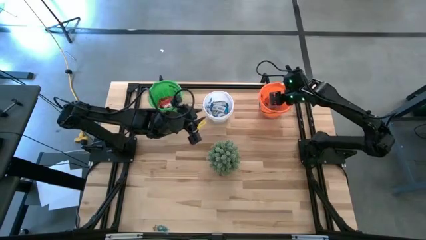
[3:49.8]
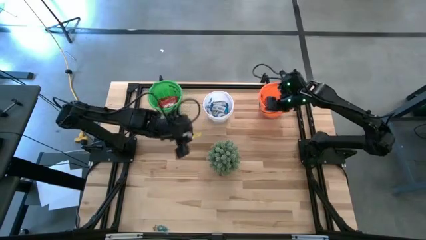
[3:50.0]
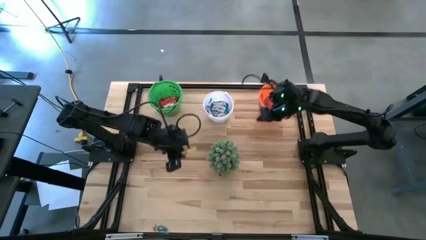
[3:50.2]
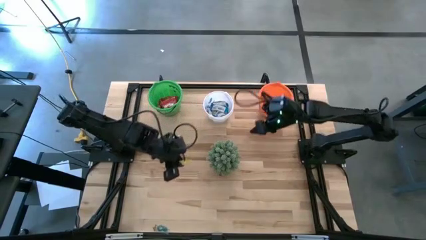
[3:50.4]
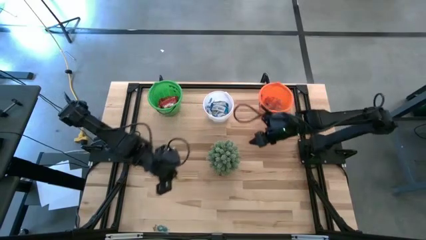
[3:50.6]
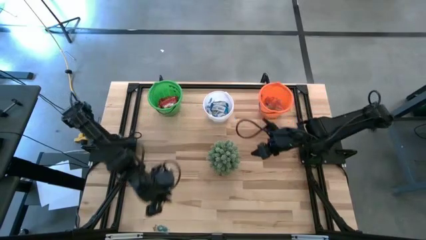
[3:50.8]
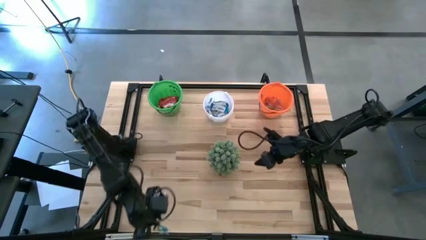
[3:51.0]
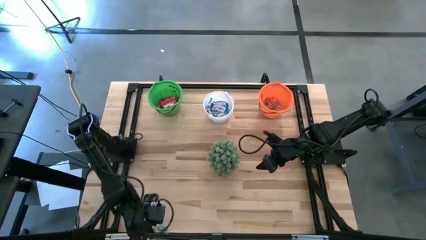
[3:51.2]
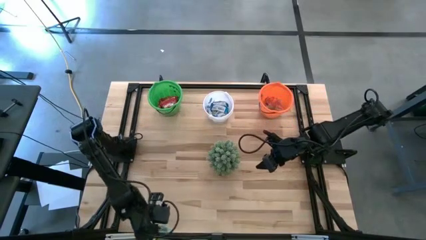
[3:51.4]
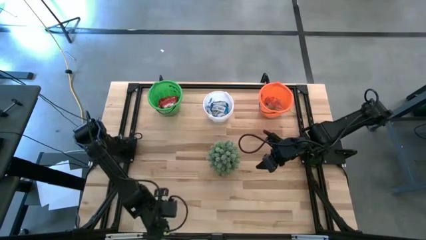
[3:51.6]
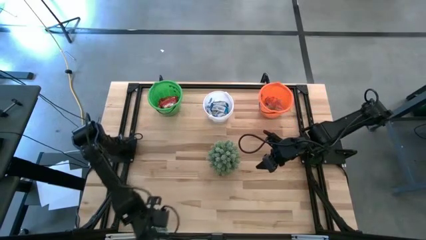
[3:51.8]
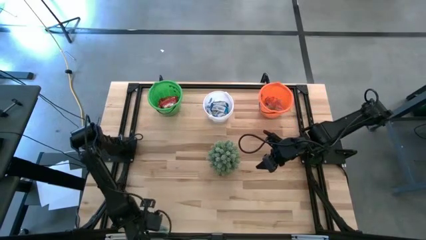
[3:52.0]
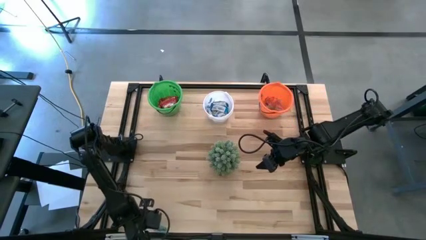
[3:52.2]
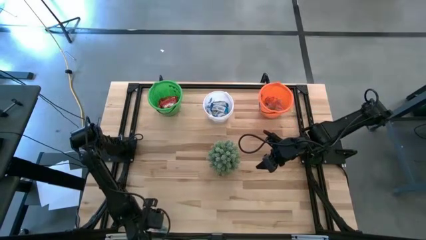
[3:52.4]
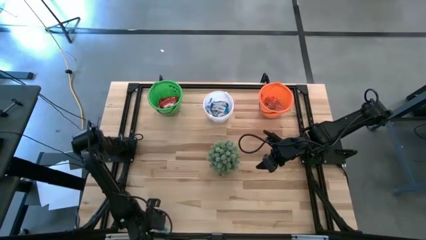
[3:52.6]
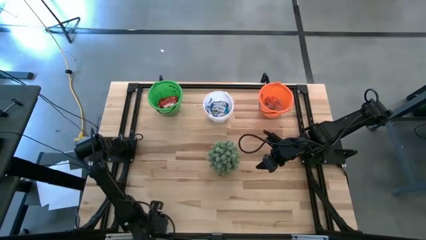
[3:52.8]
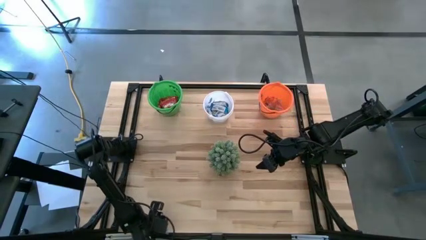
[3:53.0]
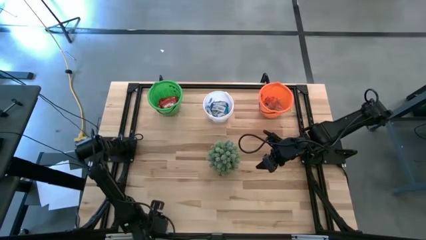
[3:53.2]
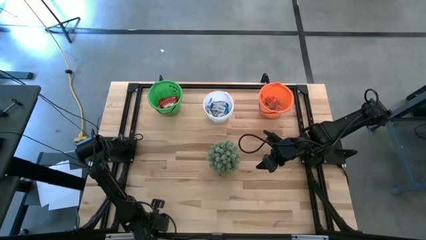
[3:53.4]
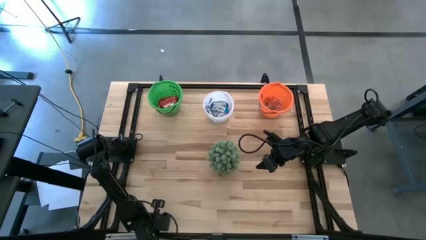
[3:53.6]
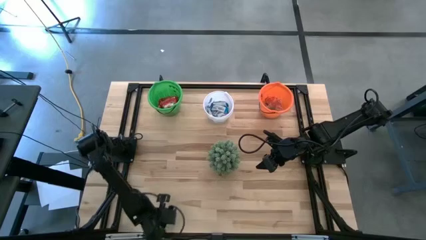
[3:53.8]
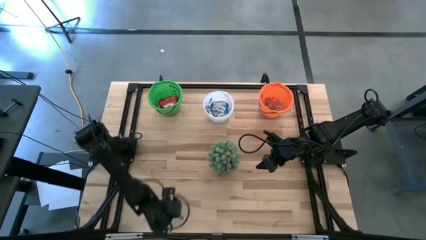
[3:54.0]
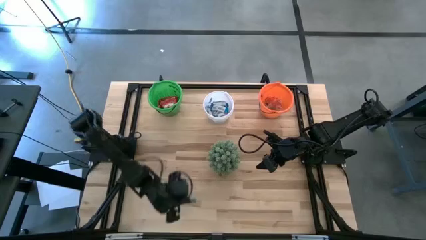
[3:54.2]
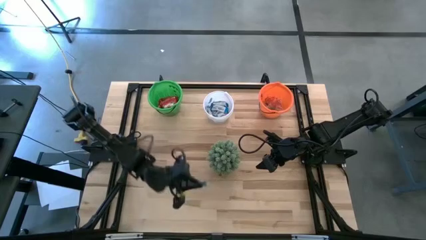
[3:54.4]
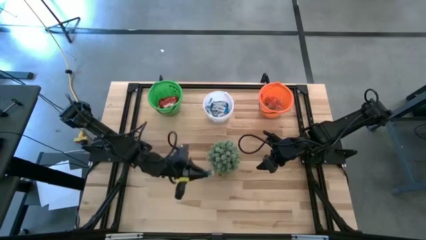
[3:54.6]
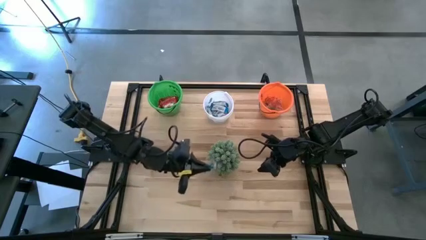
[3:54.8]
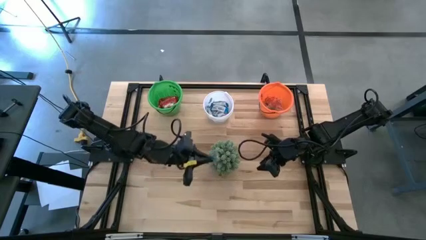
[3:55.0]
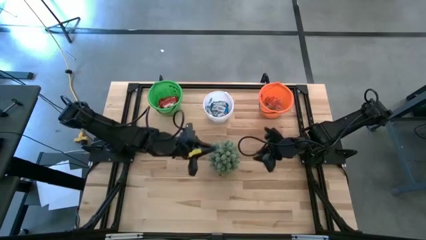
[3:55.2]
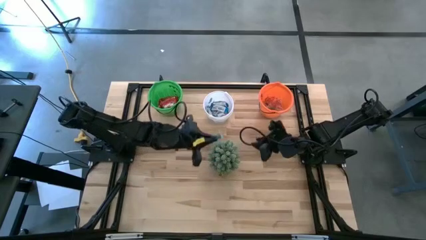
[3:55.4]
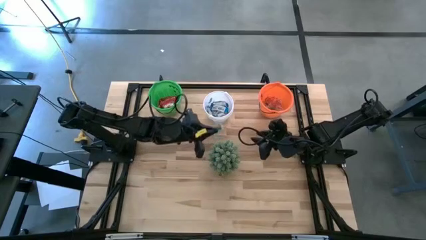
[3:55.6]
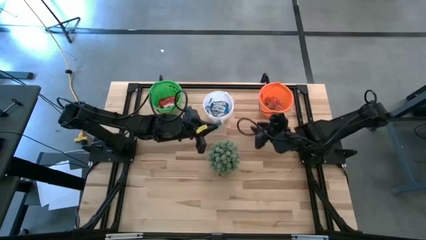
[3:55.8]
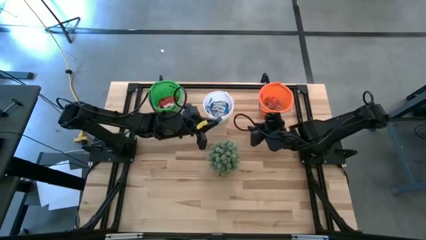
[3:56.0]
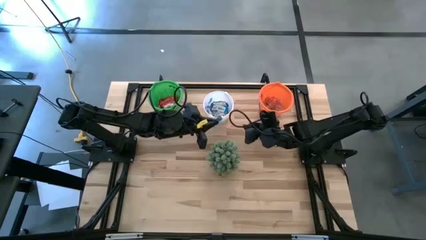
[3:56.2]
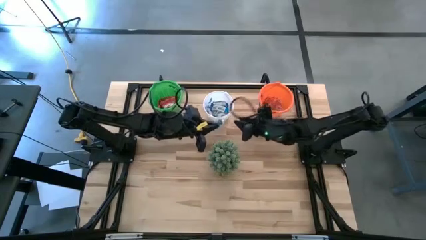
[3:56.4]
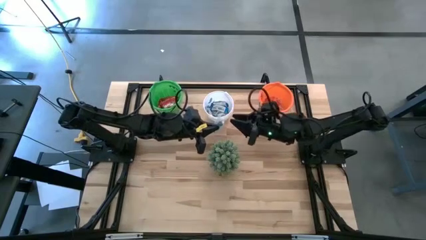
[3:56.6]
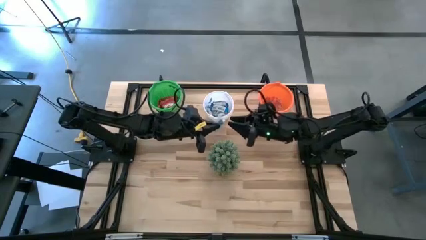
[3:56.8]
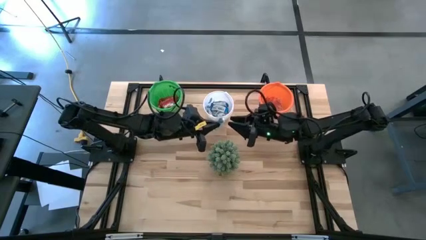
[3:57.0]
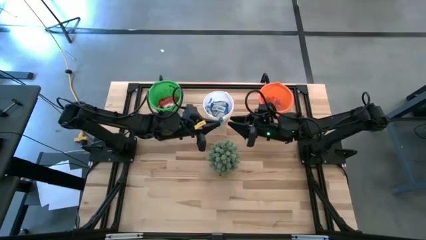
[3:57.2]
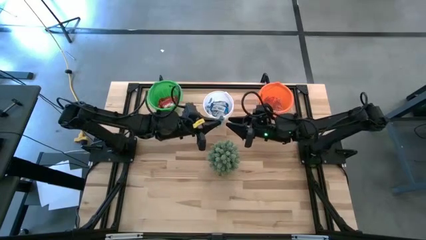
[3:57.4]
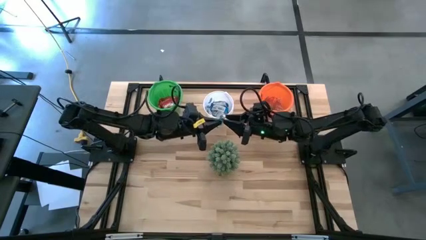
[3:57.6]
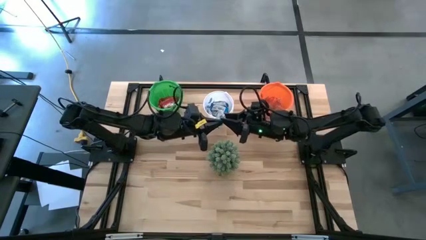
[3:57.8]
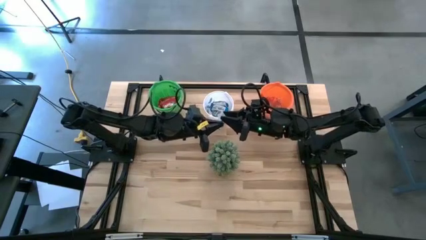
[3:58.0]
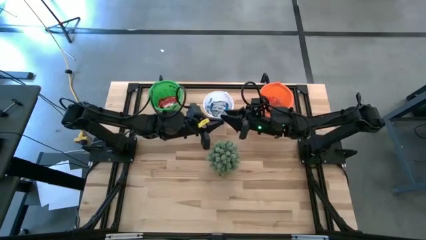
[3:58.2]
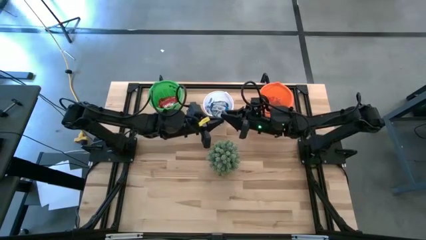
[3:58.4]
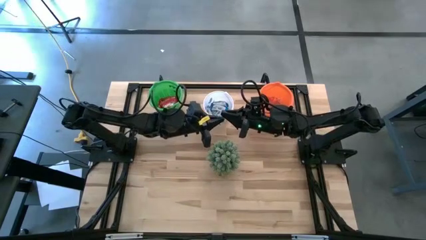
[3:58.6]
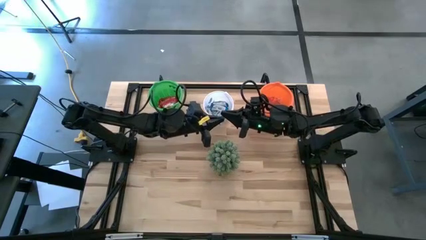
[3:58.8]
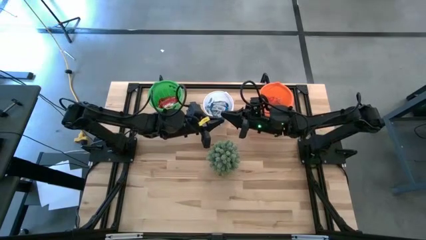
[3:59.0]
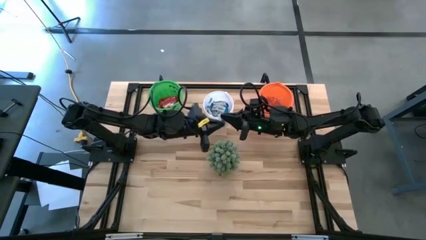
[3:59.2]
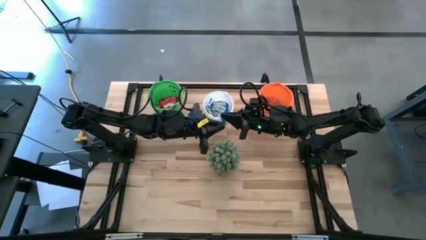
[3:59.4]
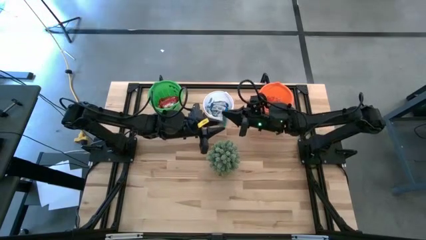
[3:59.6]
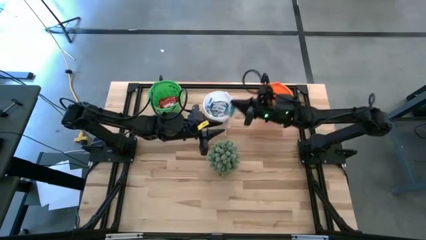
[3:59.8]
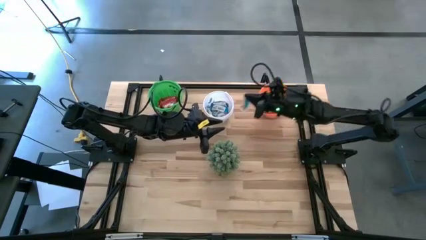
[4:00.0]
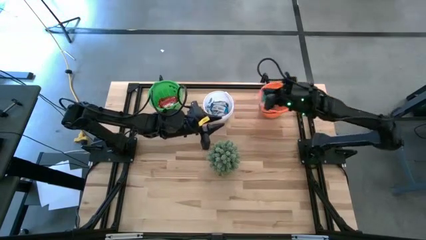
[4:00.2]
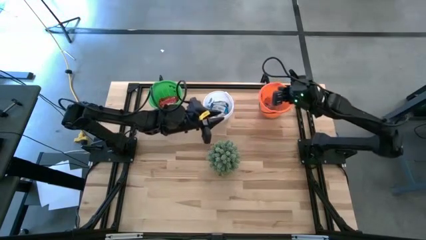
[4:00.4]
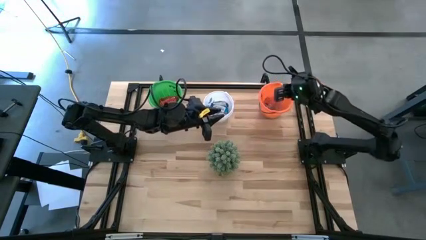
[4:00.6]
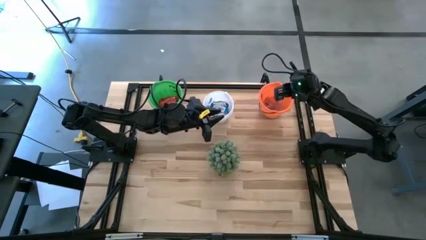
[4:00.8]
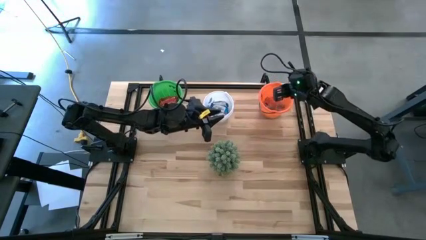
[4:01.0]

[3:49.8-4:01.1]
Task: Sort candy
Put the transparent candy into the orange bucket
